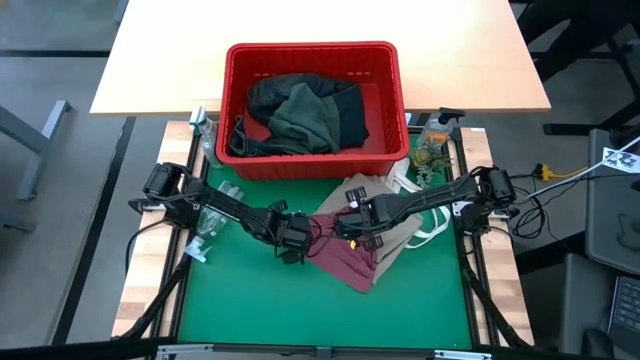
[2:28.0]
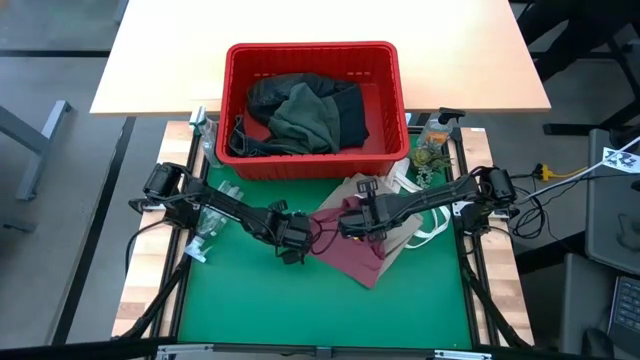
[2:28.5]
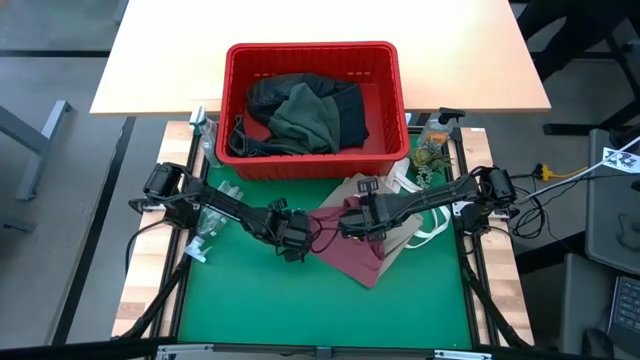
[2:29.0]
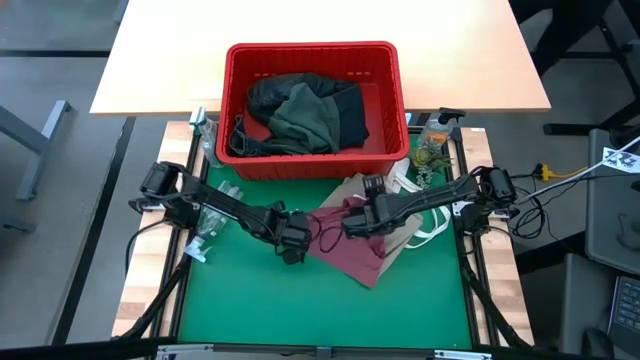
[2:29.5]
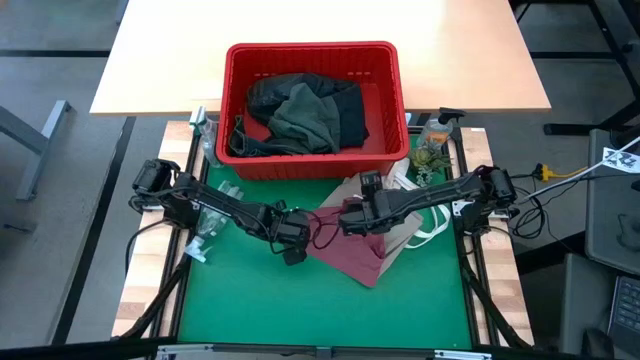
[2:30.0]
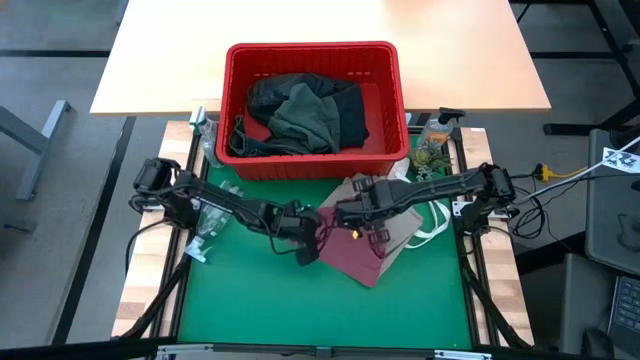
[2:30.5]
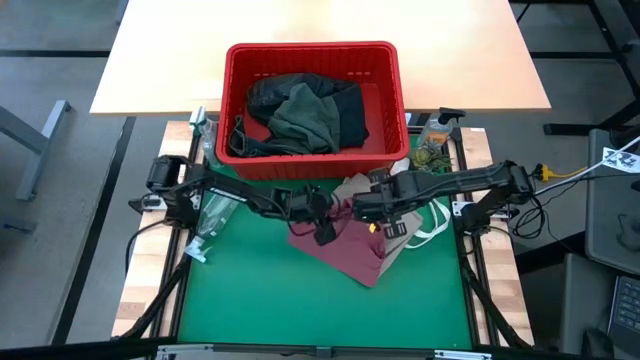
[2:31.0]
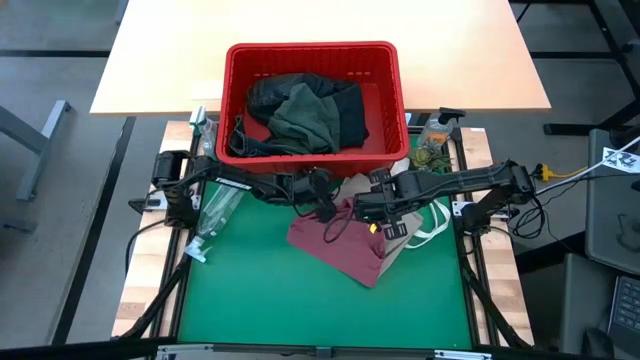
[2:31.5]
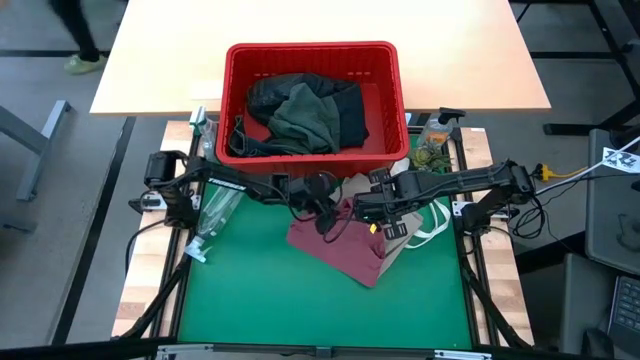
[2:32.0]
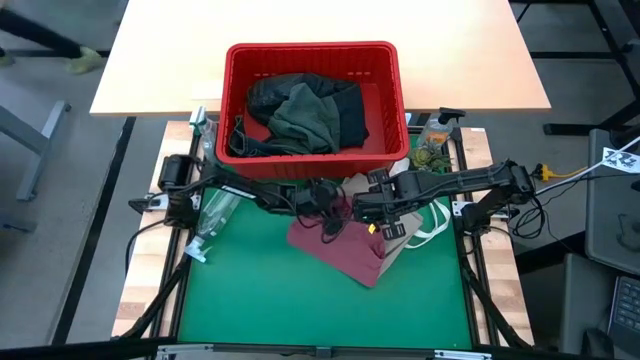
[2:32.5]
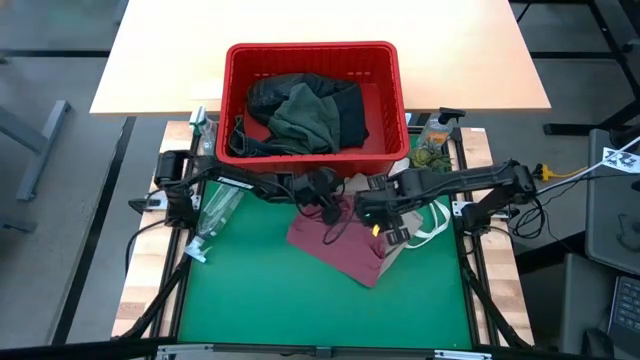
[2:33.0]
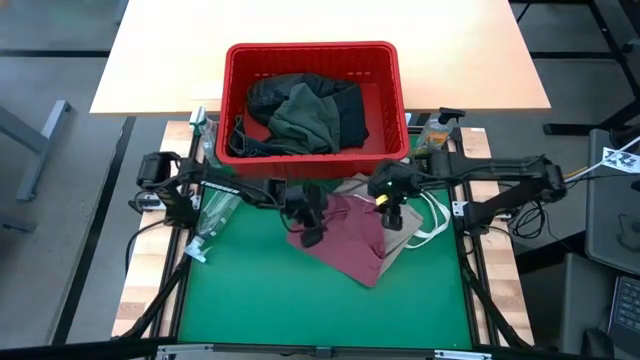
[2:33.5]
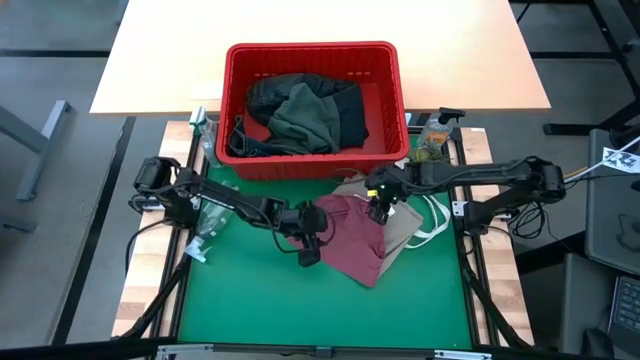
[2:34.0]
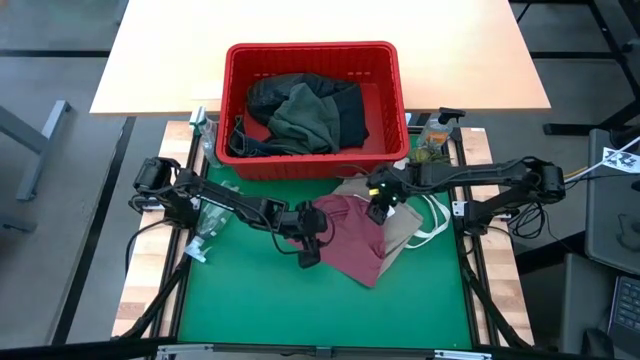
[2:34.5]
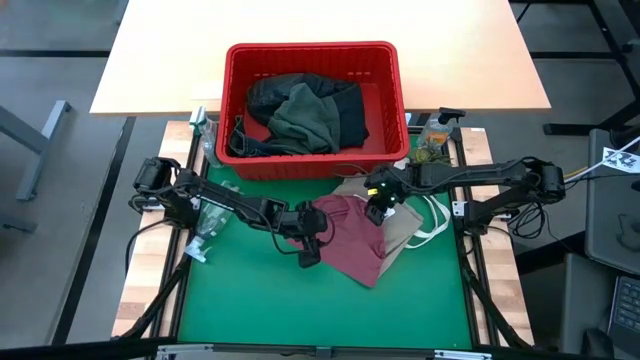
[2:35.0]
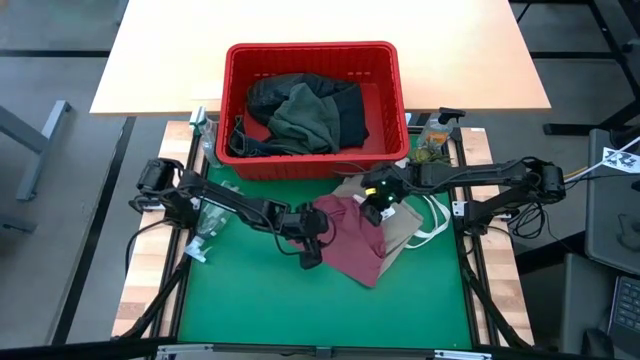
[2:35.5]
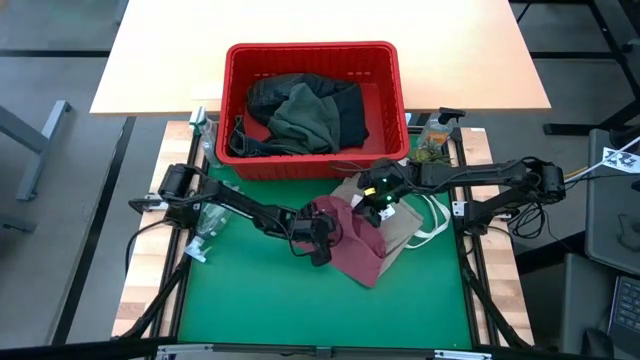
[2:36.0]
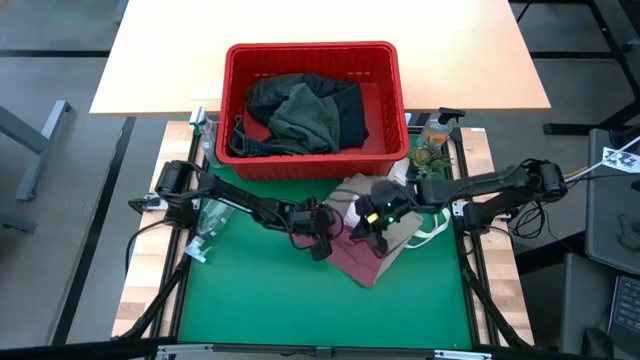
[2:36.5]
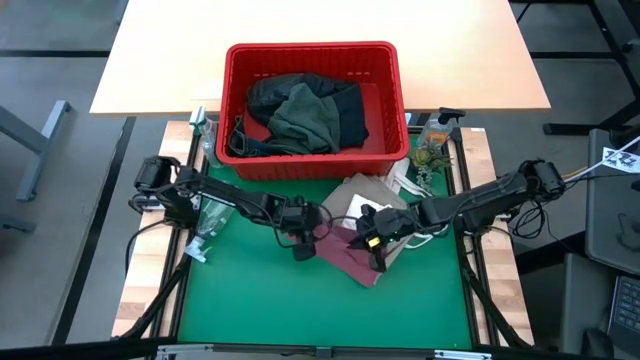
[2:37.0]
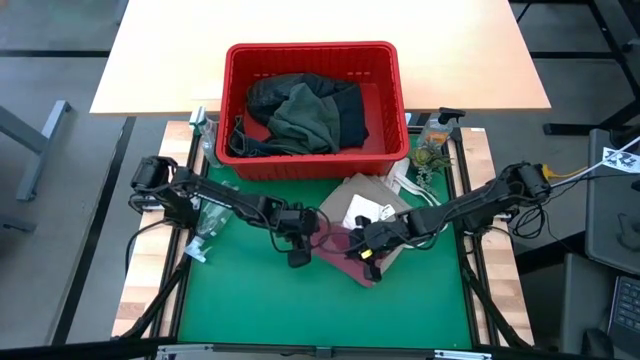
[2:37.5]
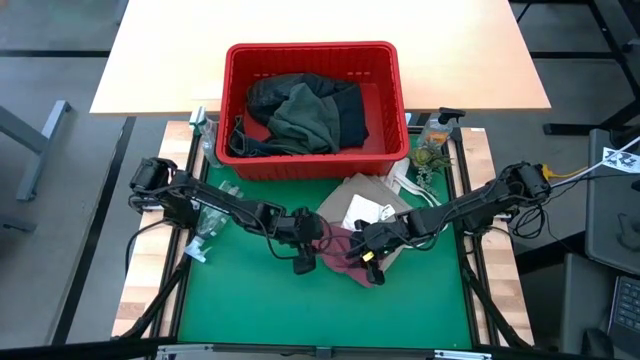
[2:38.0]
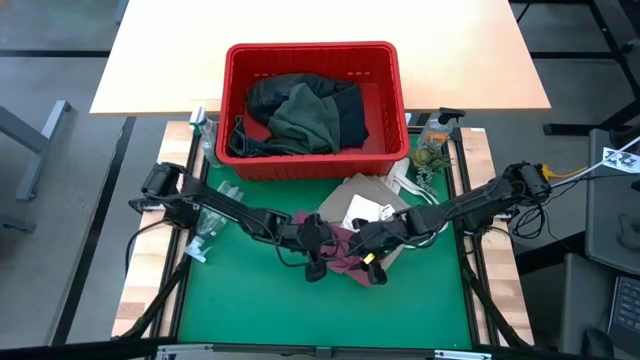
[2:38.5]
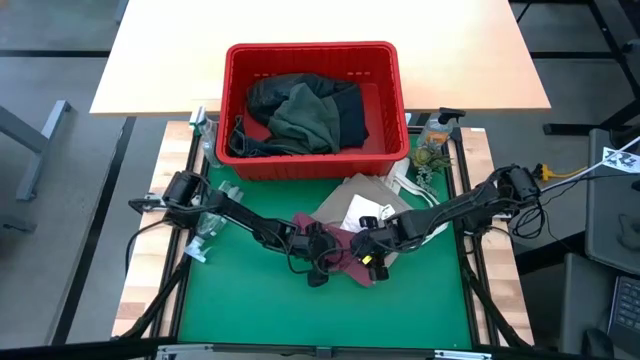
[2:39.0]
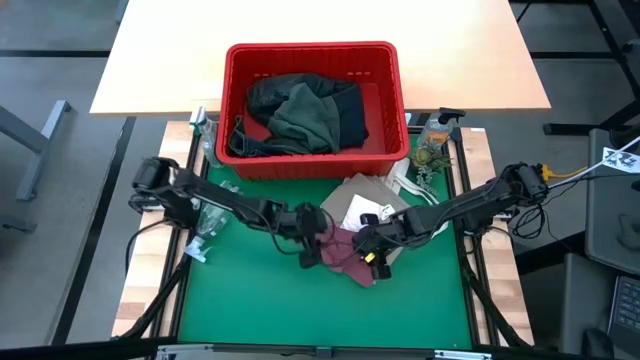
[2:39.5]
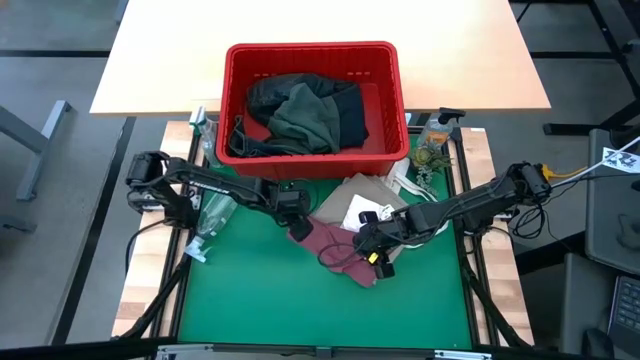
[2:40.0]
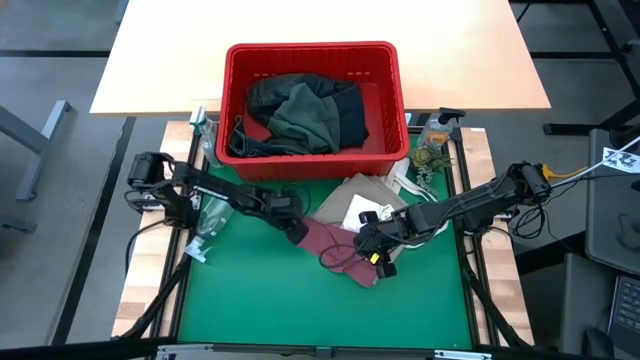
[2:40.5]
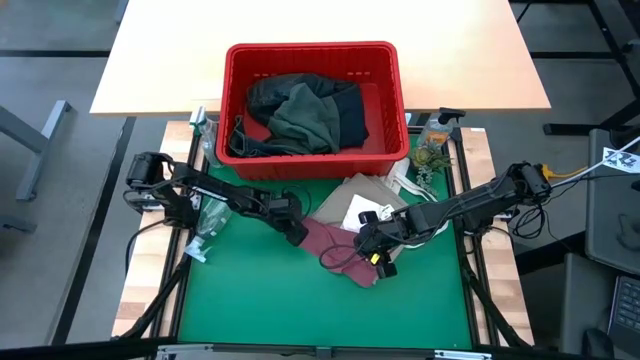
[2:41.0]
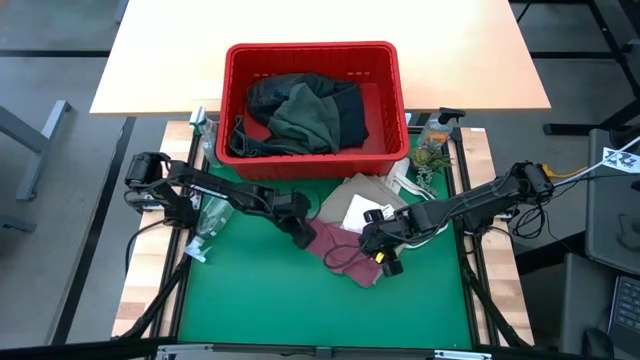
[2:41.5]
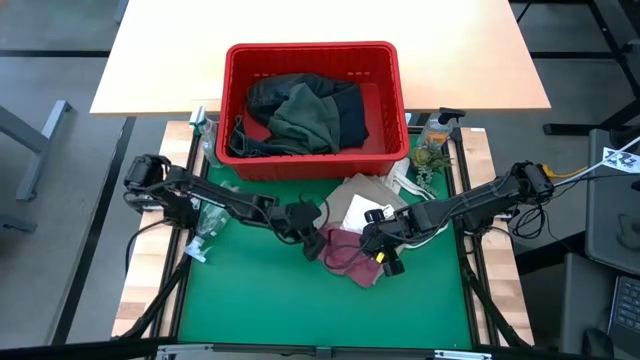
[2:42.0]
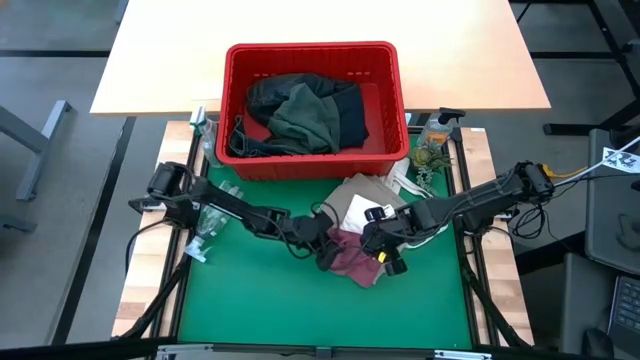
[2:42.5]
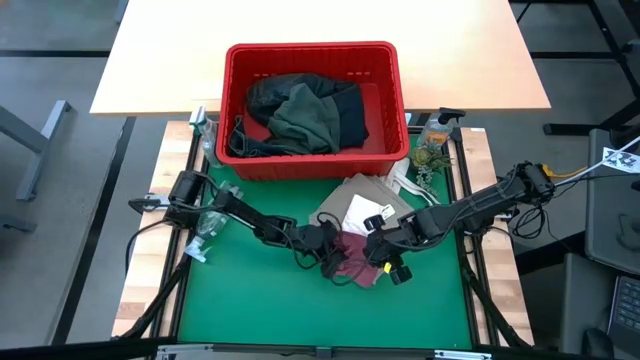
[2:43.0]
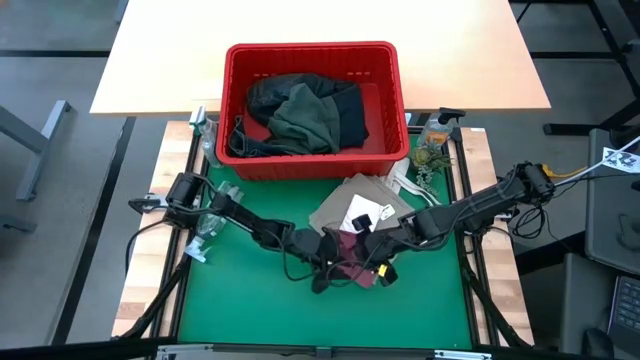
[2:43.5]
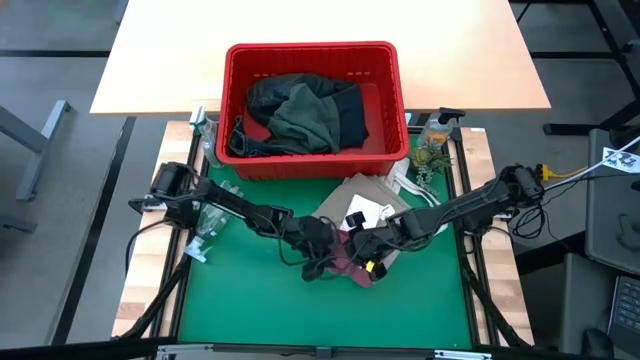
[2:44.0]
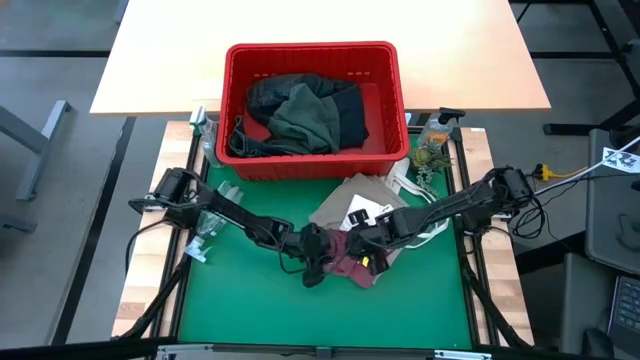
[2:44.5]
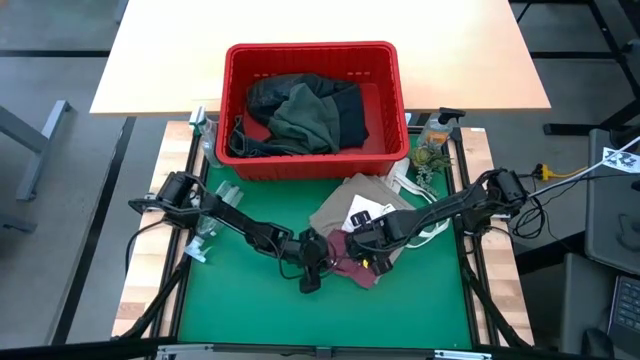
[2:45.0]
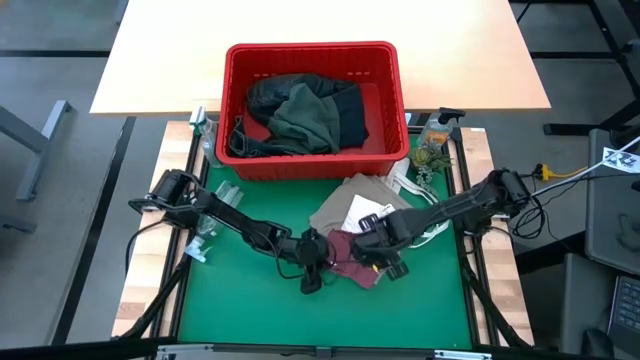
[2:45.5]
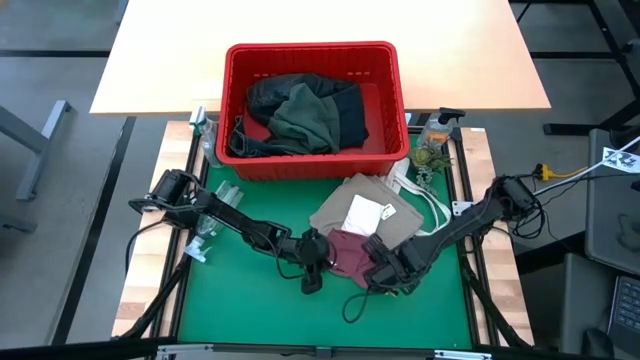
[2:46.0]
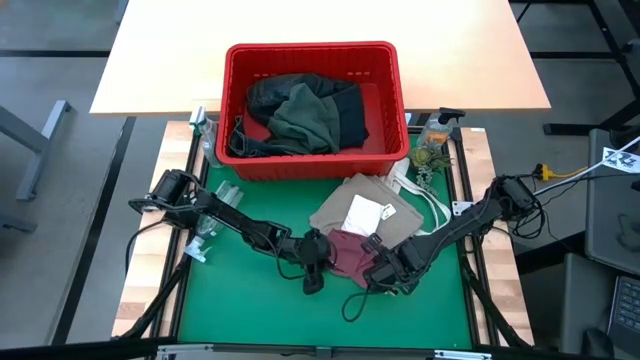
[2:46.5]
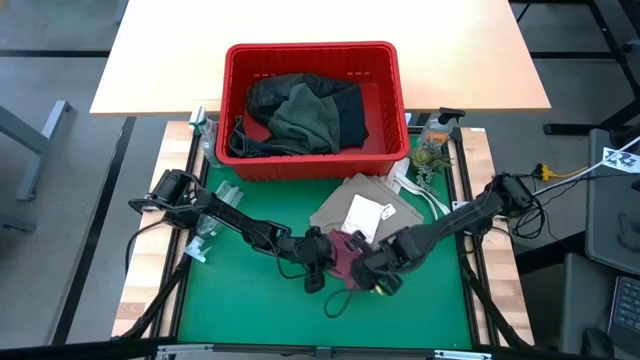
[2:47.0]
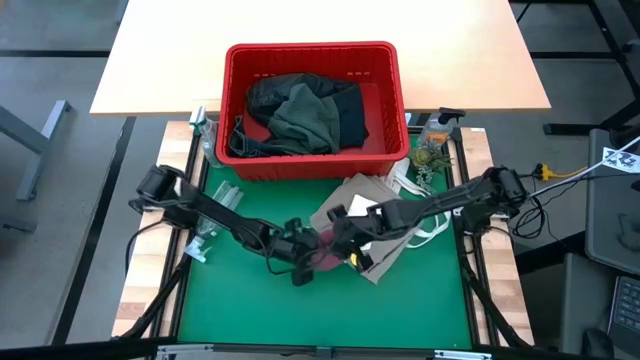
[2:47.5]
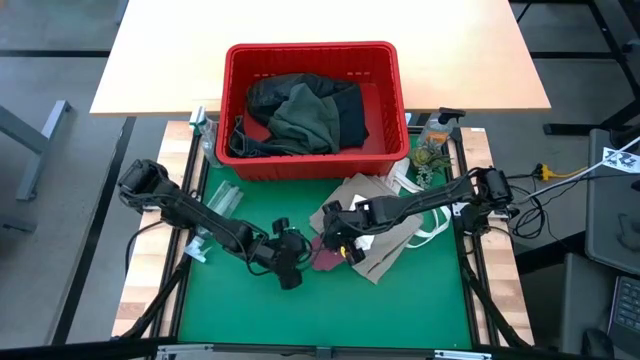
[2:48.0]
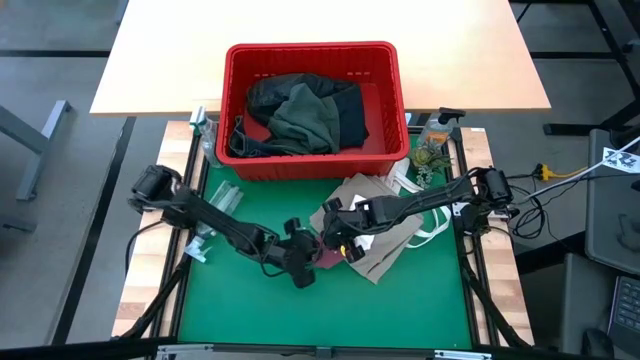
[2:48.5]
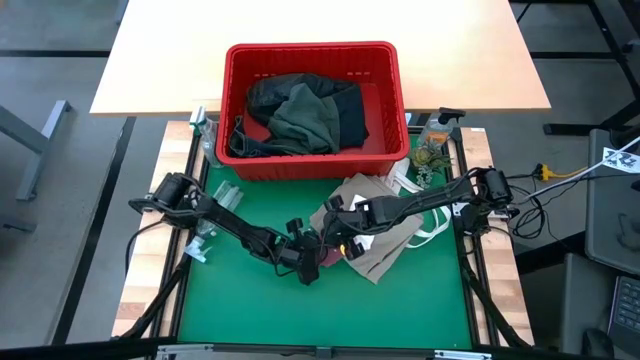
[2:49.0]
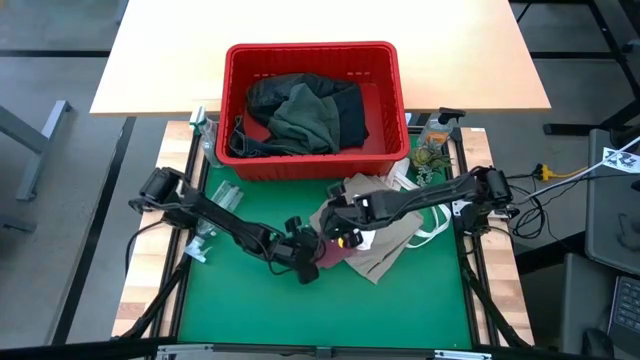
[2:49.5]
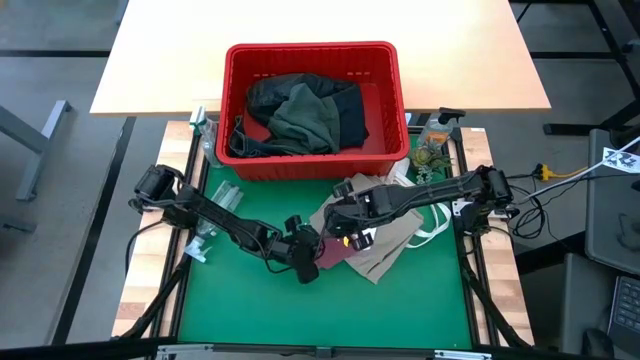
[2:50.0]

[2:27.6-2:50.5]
Task: Fold laundry
Fold the pink underwear
